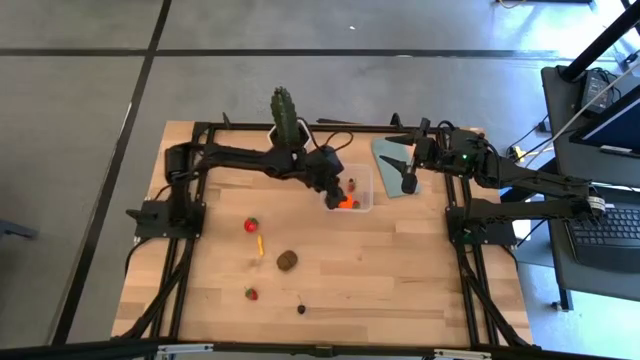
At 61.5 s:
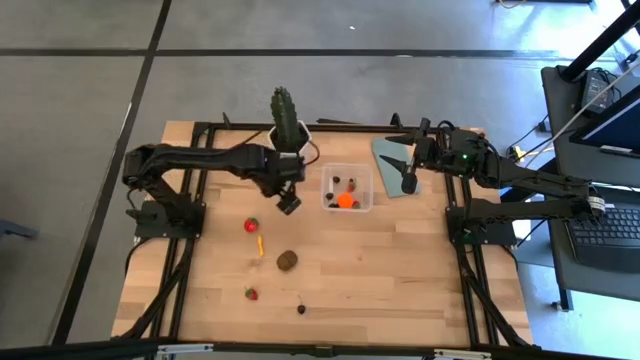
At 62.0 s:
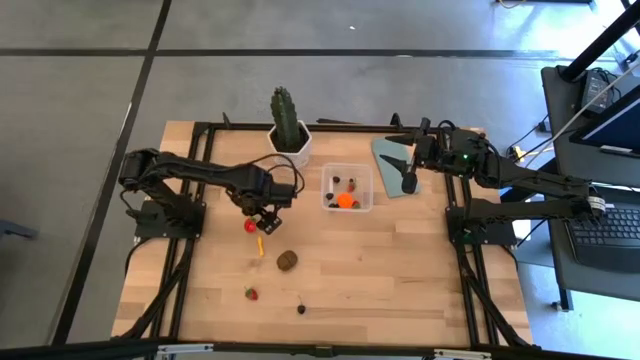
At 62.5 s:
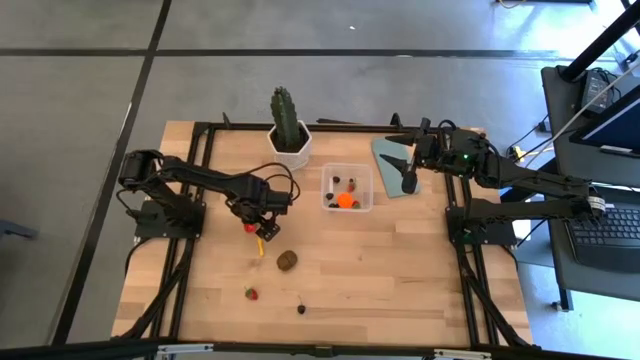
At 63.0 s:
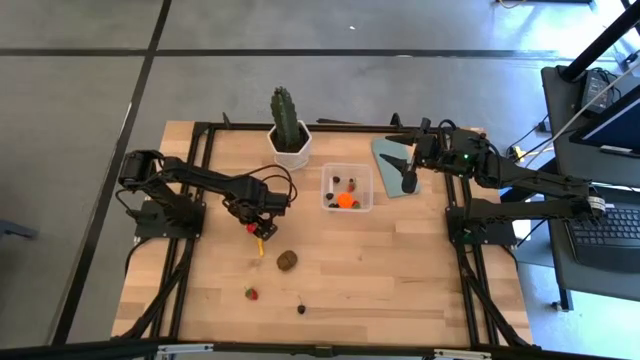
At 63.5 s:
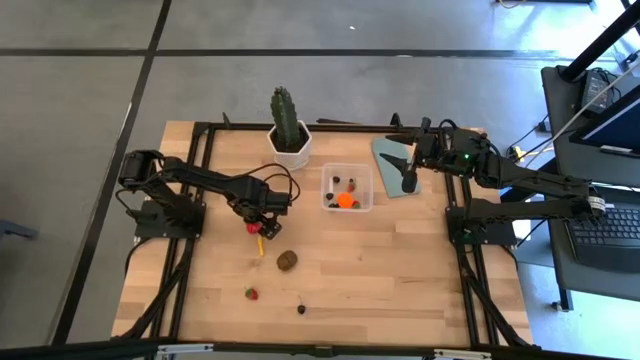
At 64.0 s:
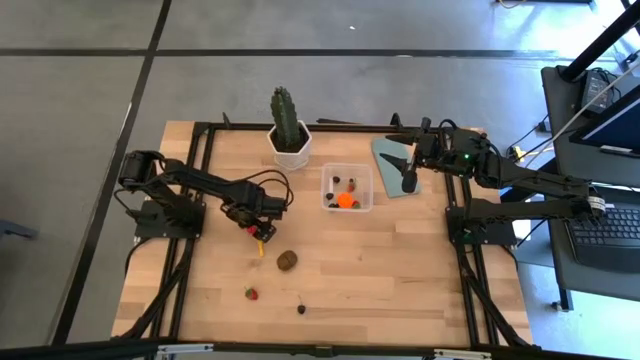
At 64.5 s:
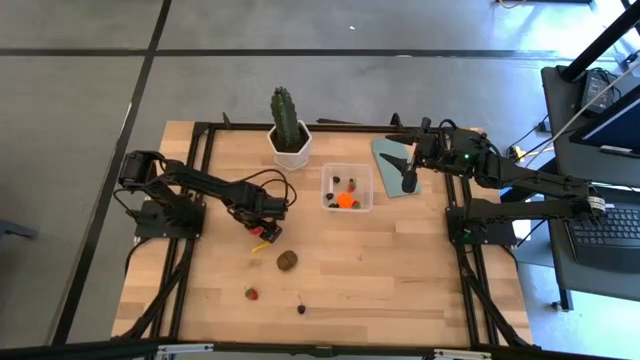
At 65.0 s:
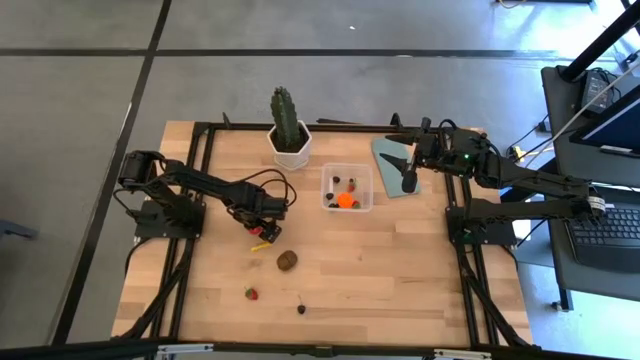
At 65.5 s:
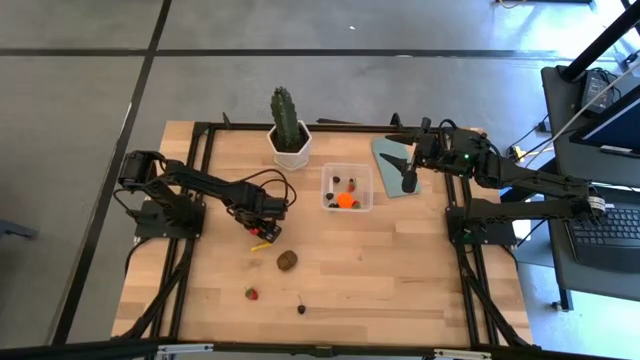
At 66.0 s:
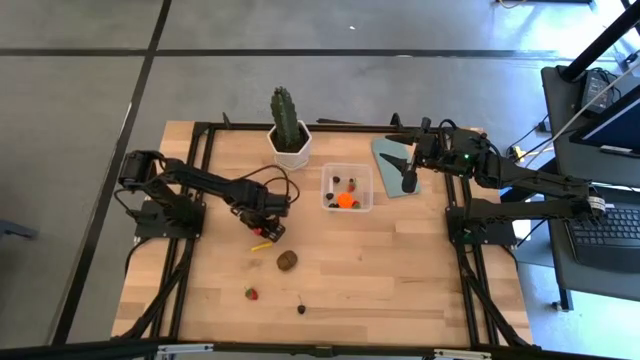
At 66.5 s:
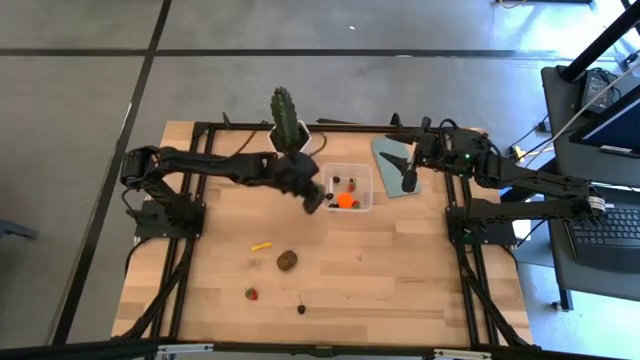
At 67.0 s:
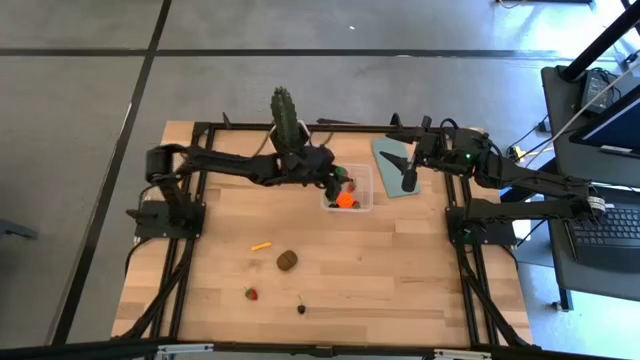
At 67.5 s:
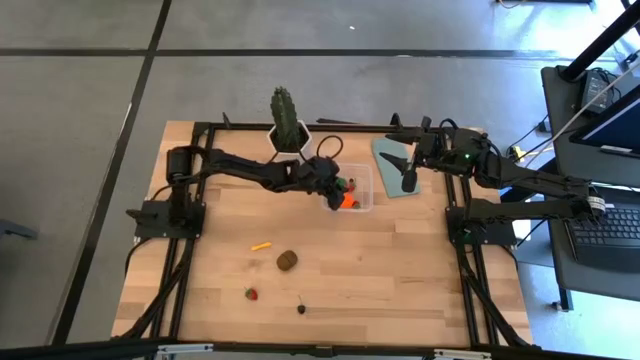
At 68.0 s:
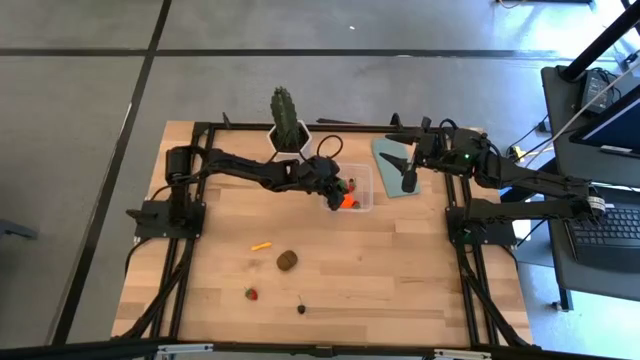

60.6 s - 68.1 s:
Task: Pick and placing Produce into tupperware
Put the tomato into the transparent bin

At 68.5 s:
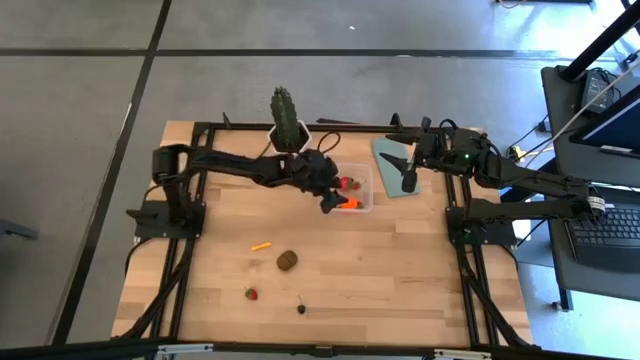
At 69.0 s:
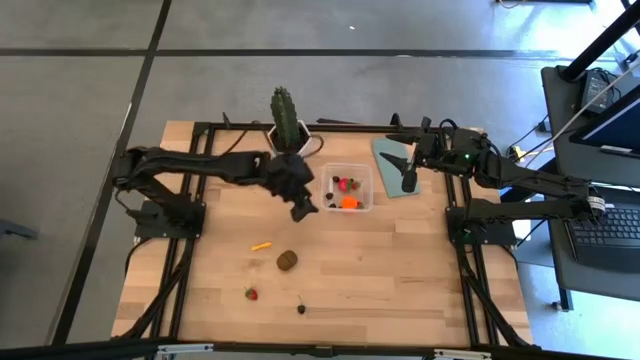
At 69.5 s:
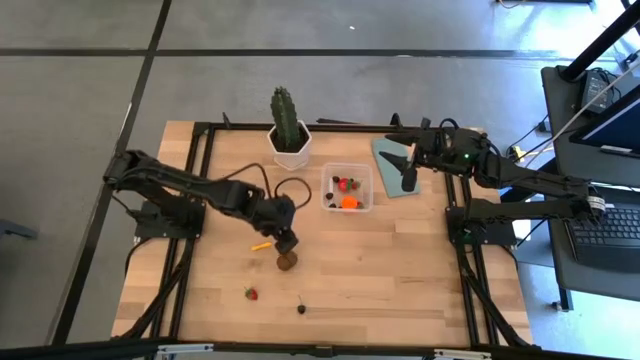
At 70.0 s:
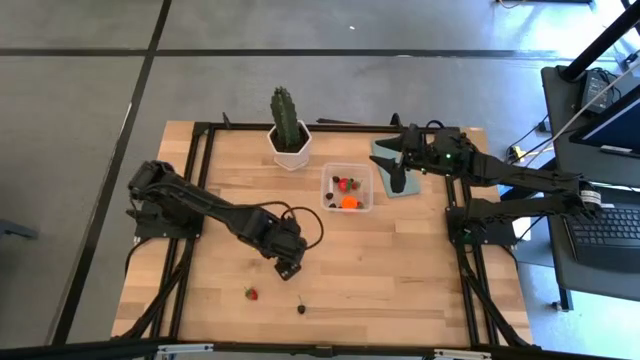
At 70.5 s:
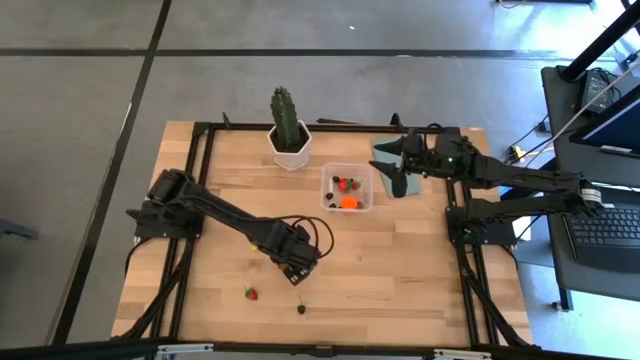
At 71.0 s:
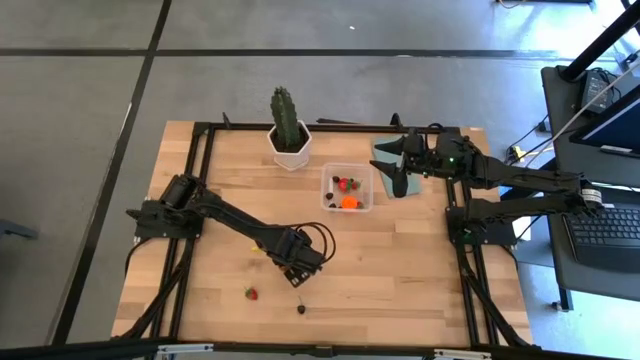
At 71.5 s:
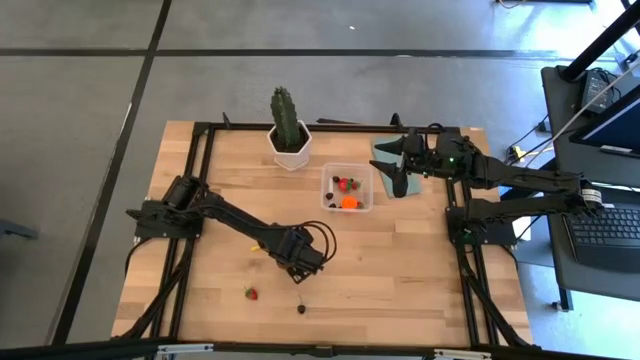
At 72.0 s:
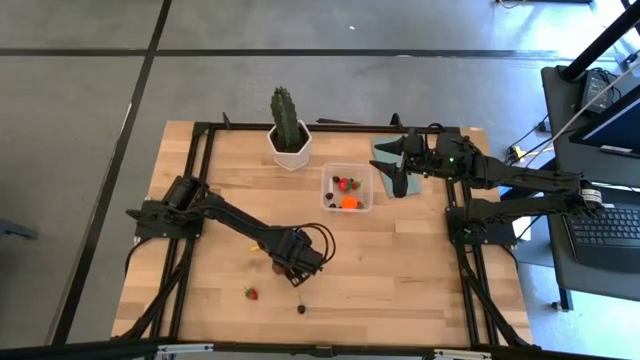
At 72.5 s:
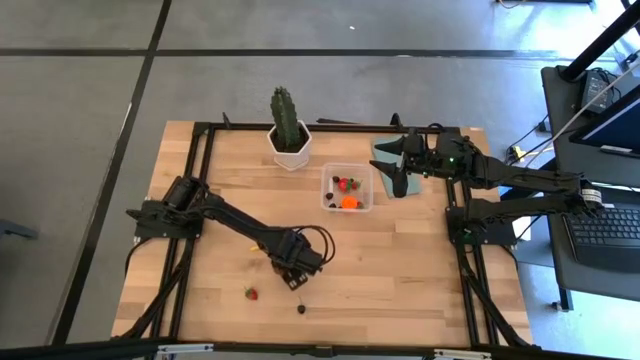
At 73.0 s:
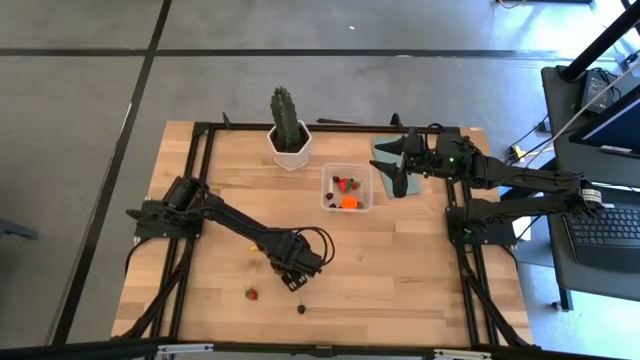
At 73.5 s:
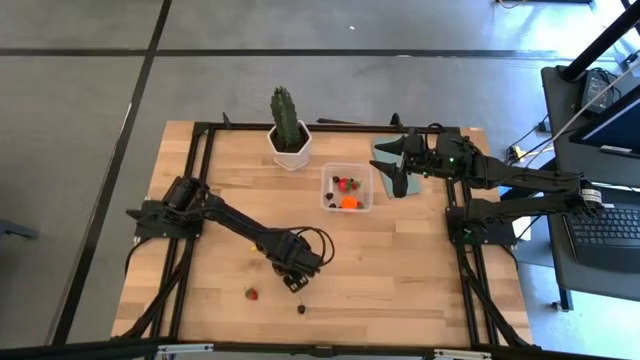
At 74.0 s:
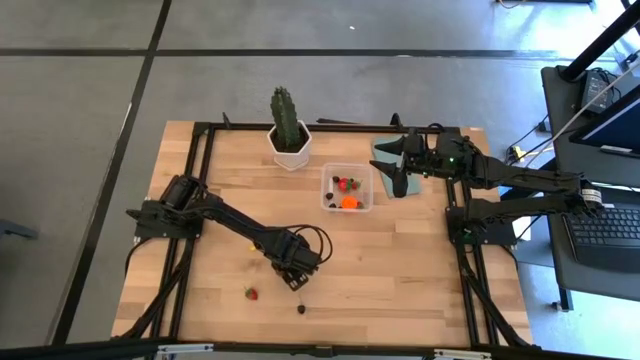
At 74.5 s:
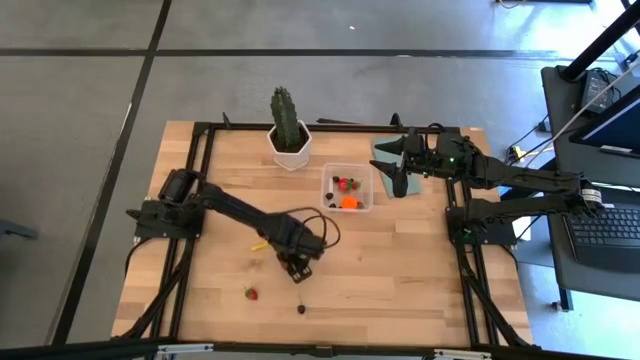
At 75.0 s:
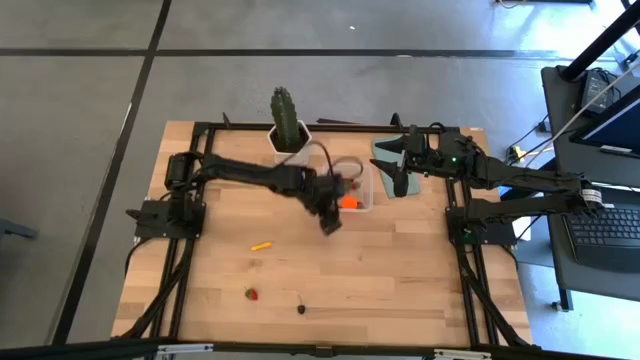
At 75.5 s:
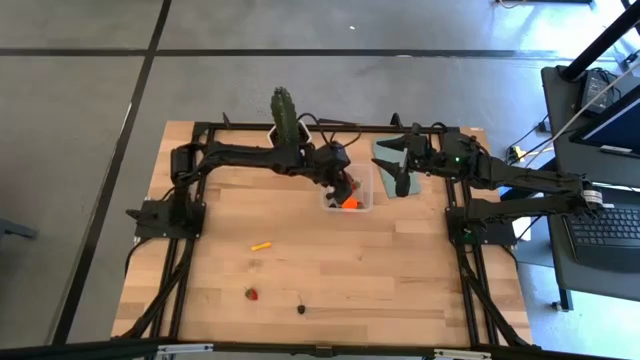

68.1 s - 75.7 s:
Put the kiwi into the transparent bin

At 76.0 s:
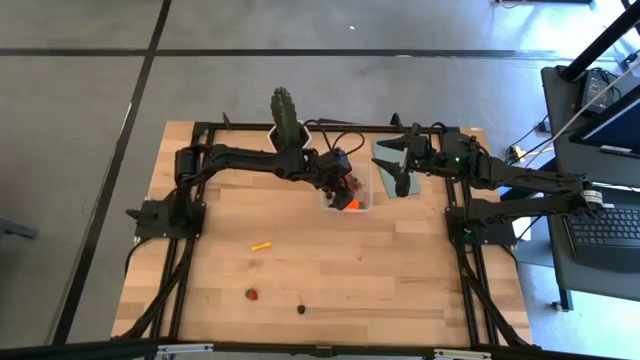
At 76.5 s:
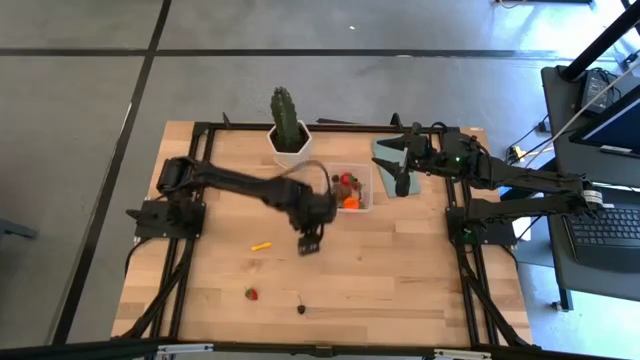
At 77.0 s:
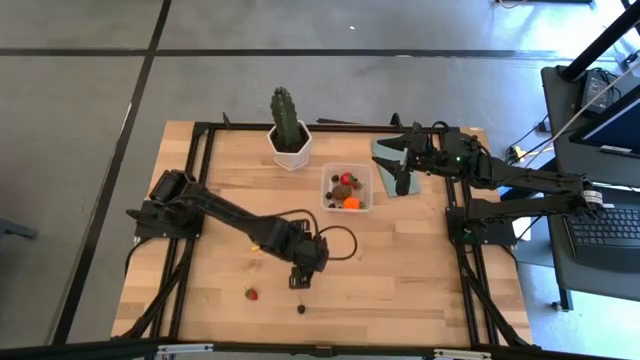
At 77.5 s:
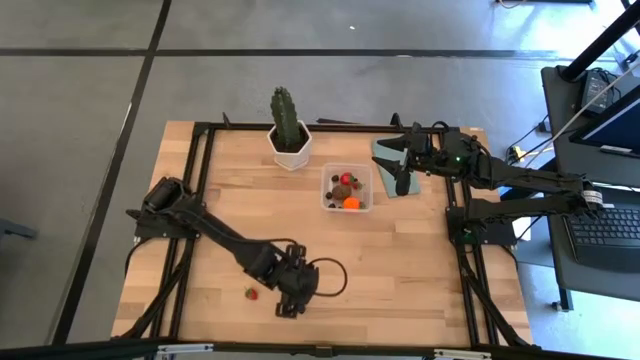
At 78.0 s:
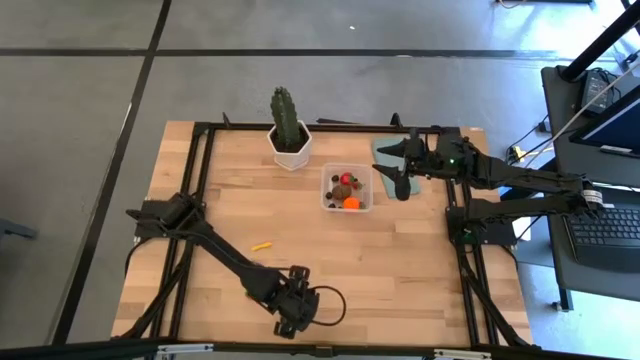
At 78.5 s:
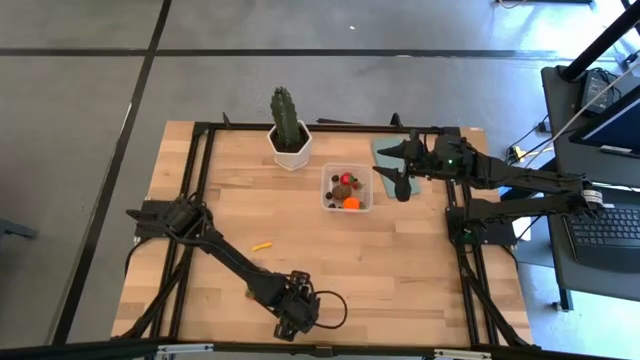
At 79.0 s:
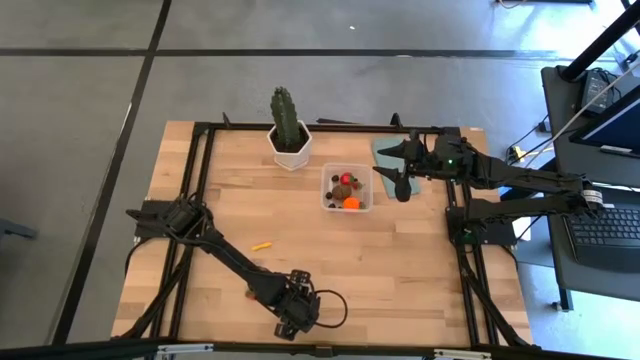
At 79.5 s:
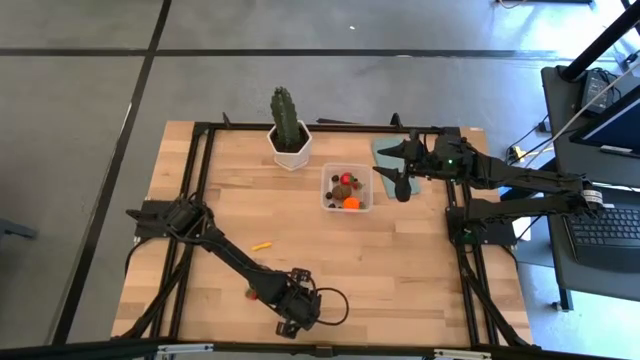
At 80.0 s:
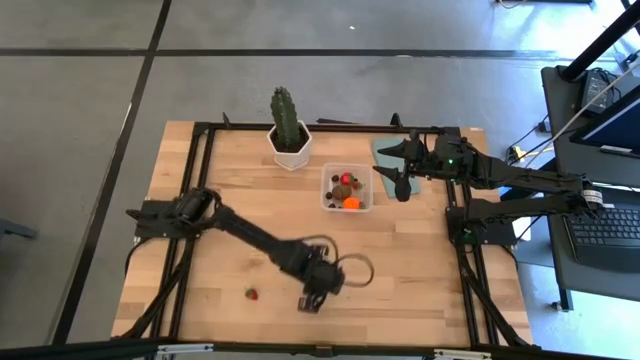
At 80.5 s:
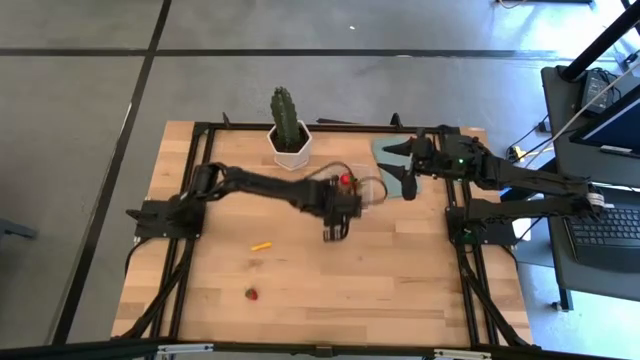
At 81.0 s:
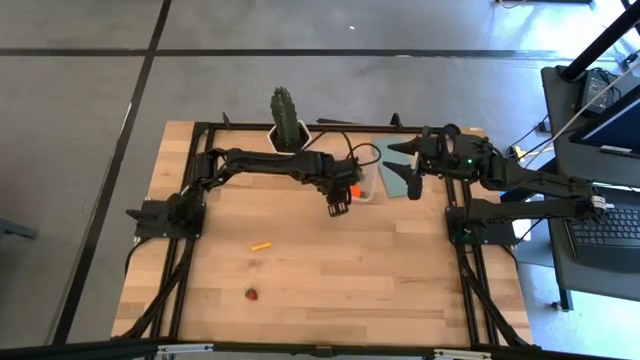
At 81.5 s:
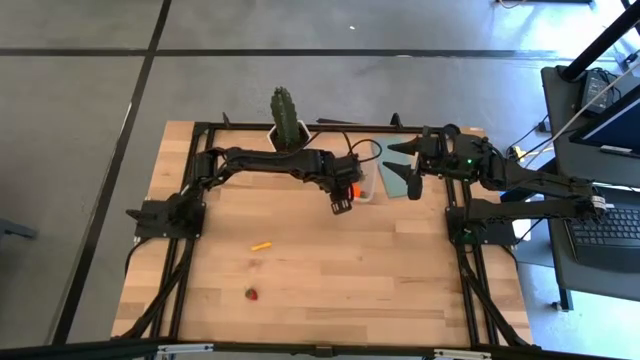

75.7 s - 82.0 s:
Put the cherry into the transparent bin
